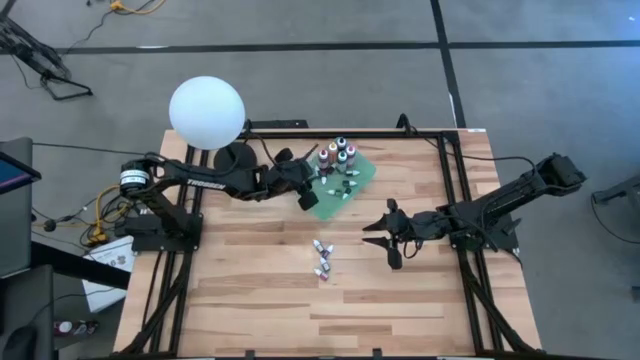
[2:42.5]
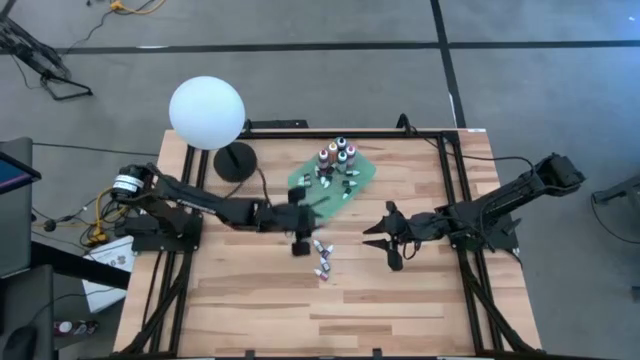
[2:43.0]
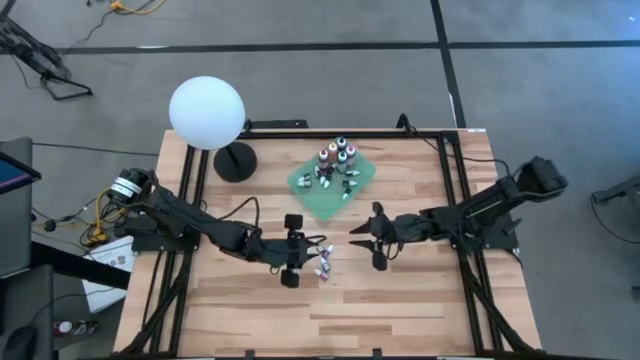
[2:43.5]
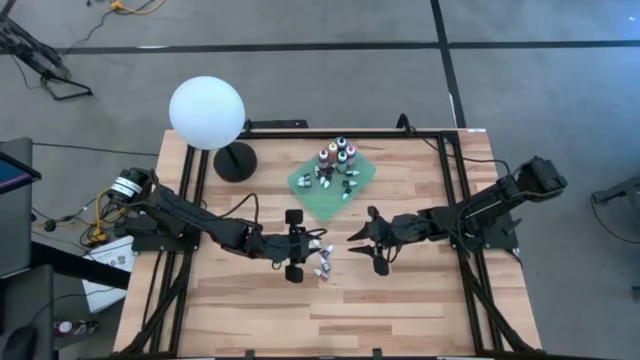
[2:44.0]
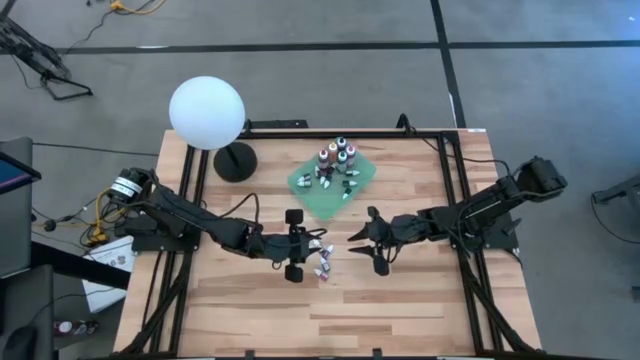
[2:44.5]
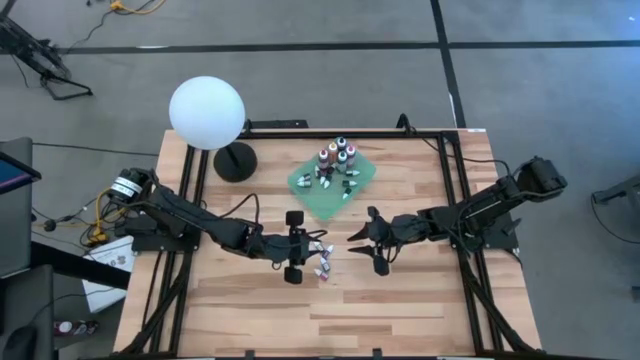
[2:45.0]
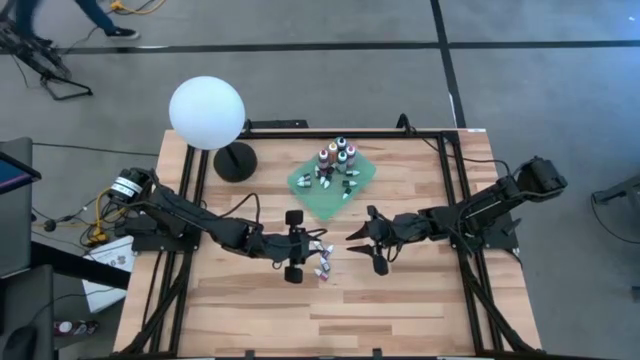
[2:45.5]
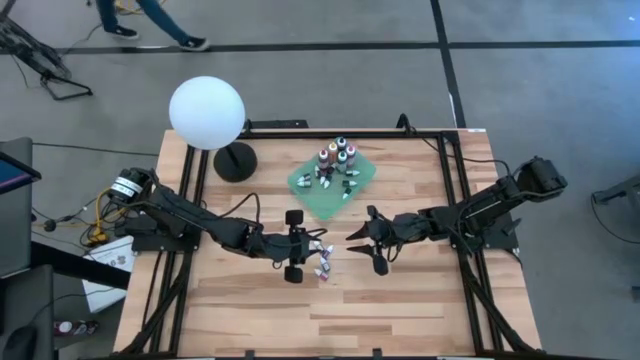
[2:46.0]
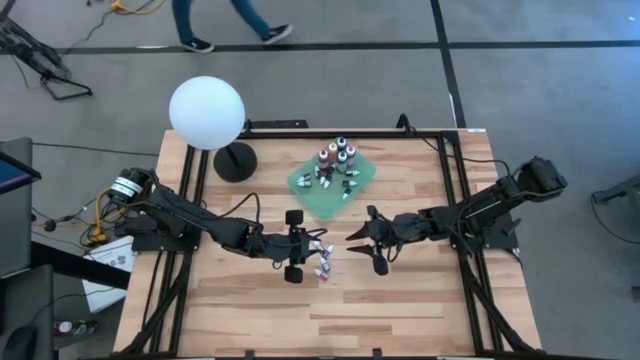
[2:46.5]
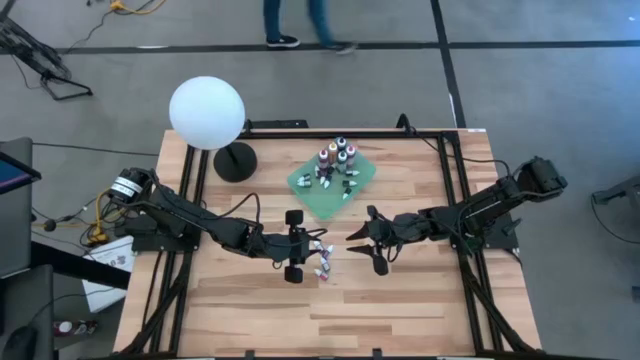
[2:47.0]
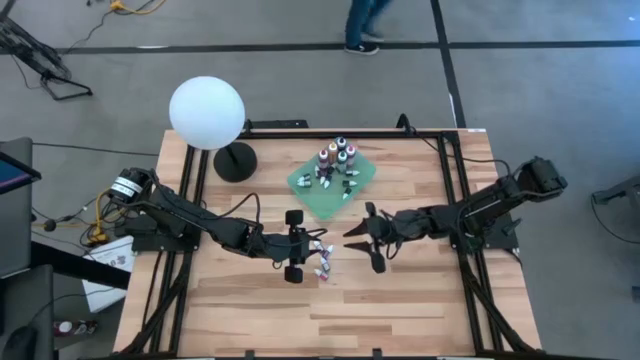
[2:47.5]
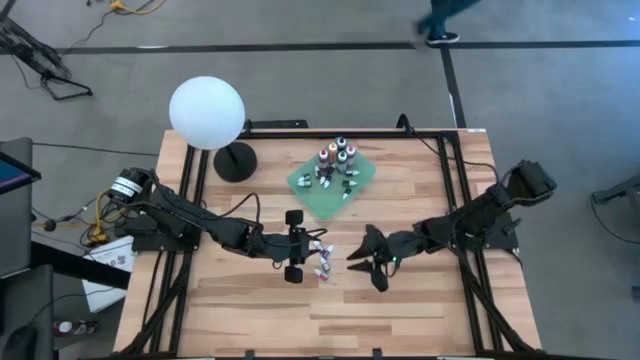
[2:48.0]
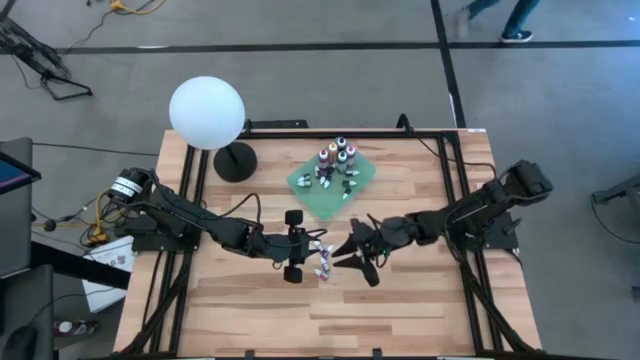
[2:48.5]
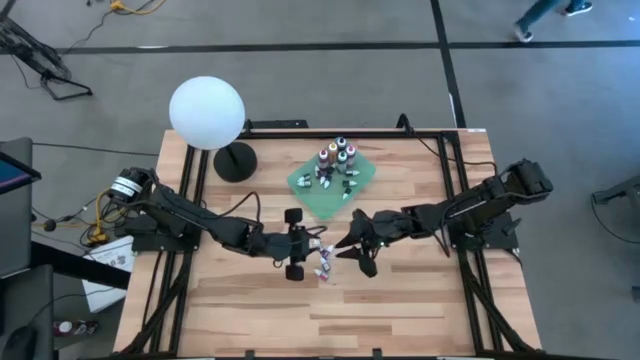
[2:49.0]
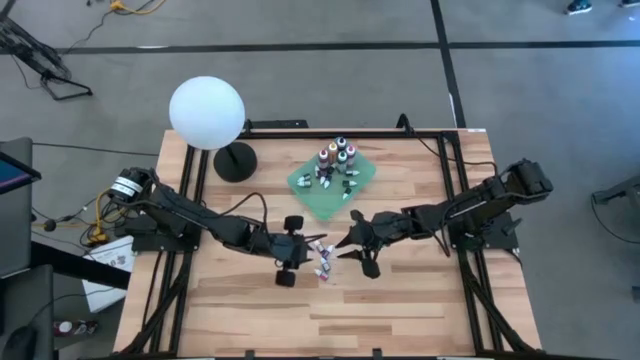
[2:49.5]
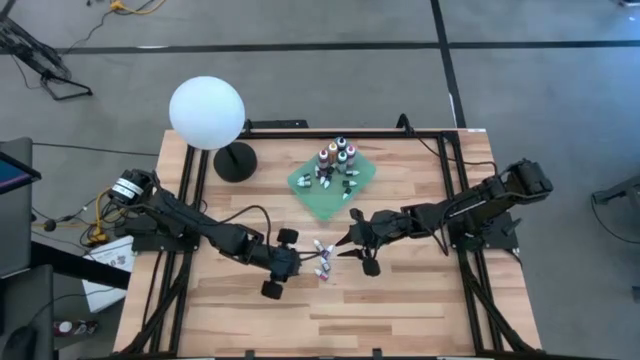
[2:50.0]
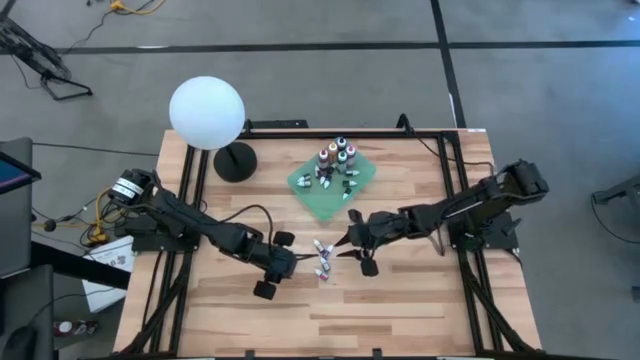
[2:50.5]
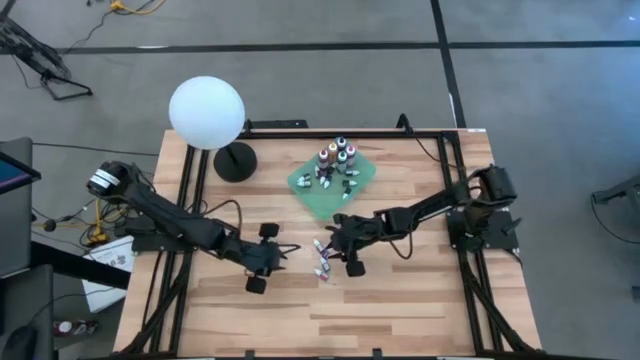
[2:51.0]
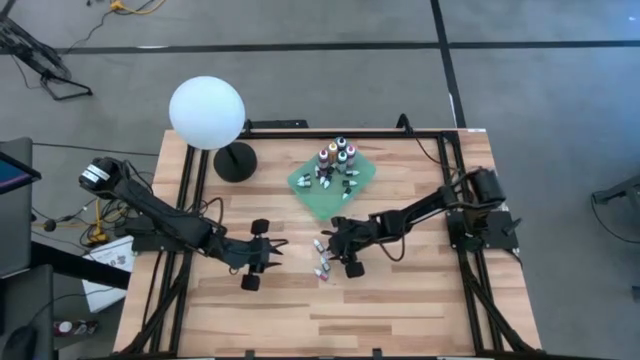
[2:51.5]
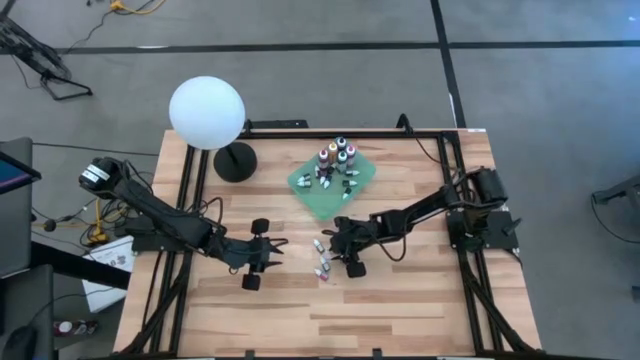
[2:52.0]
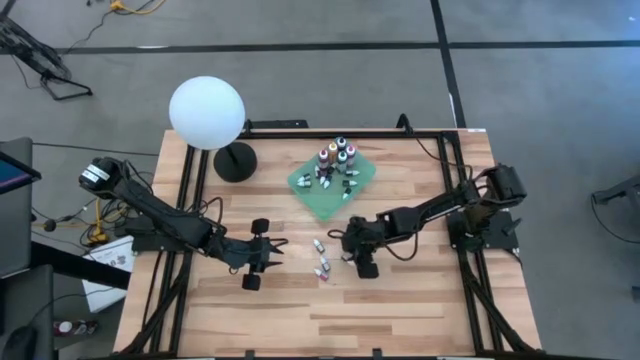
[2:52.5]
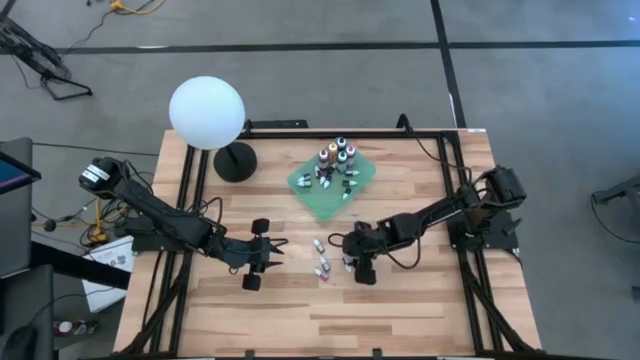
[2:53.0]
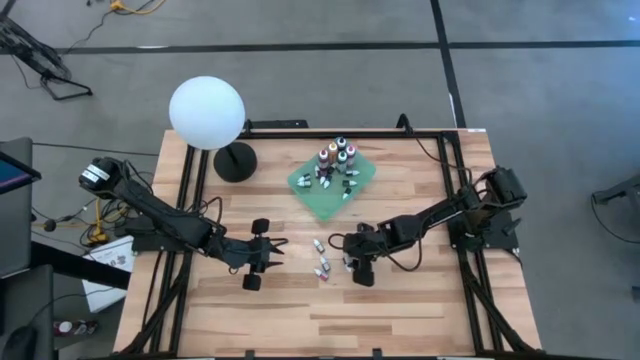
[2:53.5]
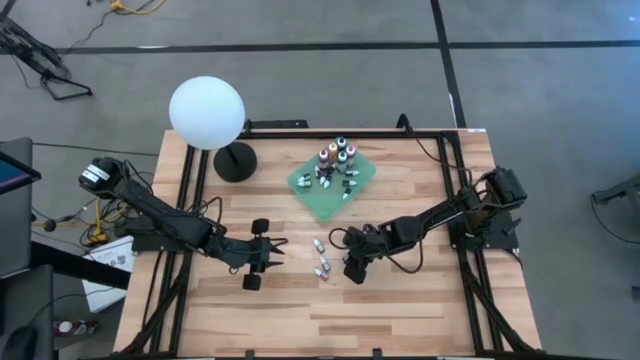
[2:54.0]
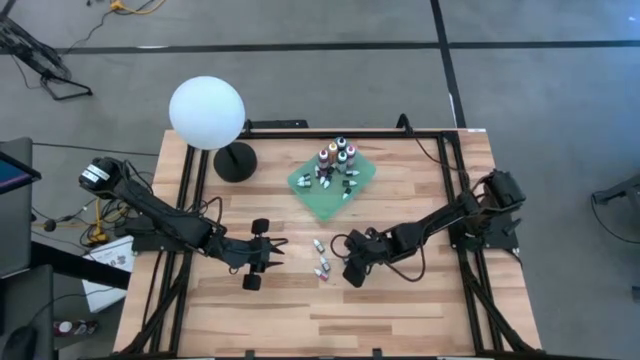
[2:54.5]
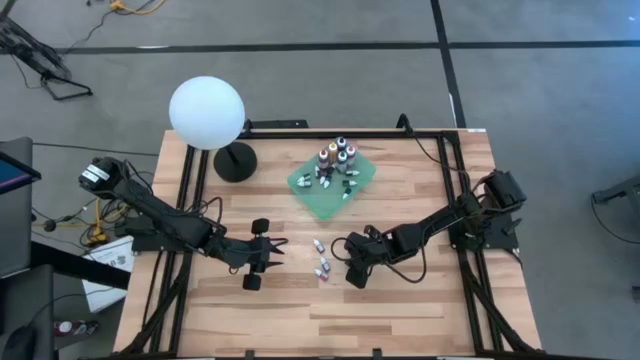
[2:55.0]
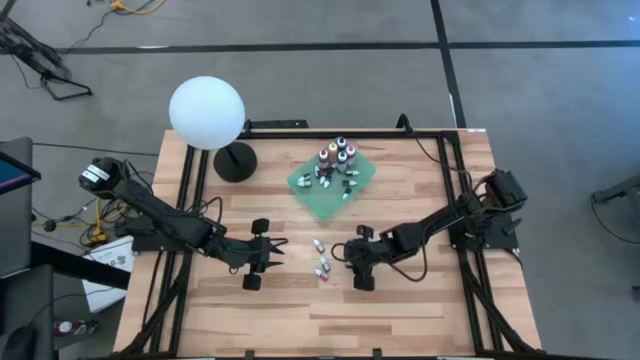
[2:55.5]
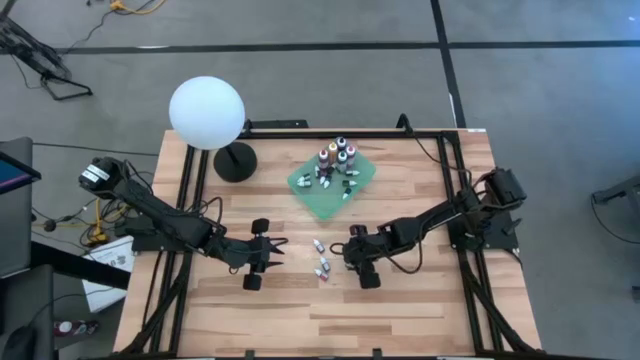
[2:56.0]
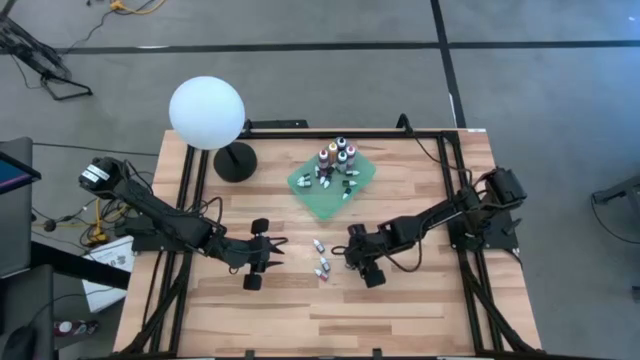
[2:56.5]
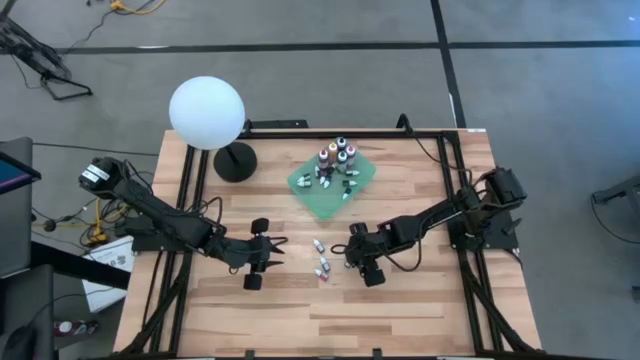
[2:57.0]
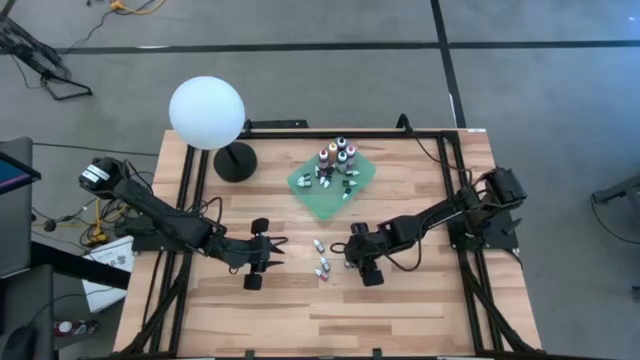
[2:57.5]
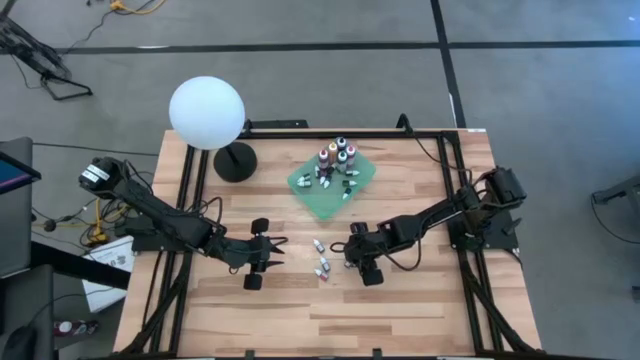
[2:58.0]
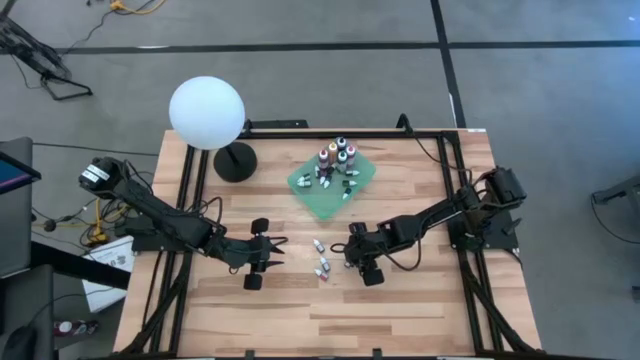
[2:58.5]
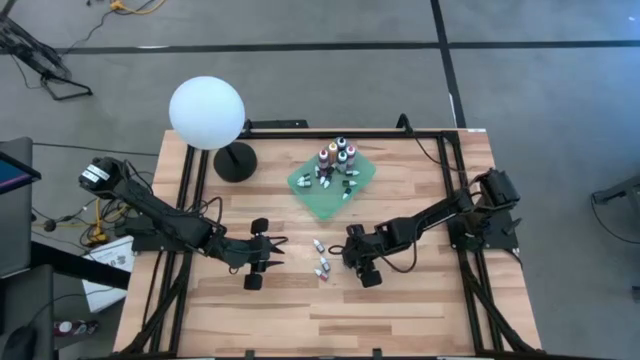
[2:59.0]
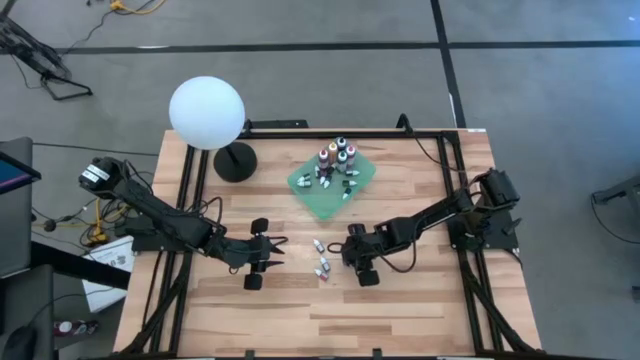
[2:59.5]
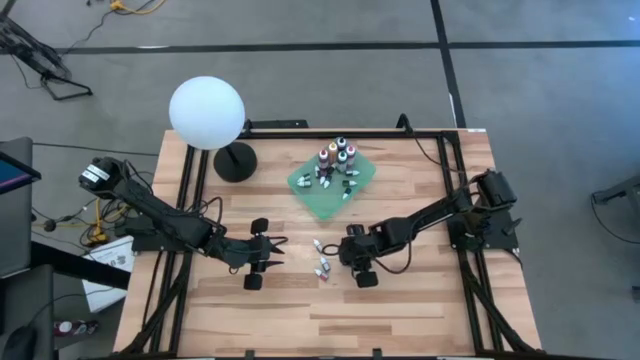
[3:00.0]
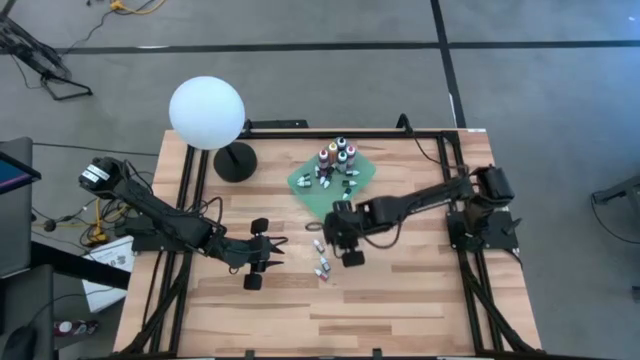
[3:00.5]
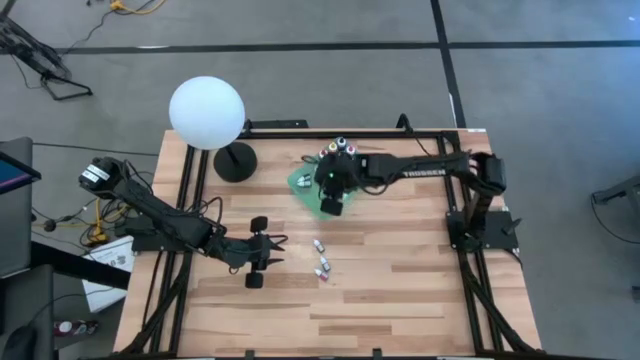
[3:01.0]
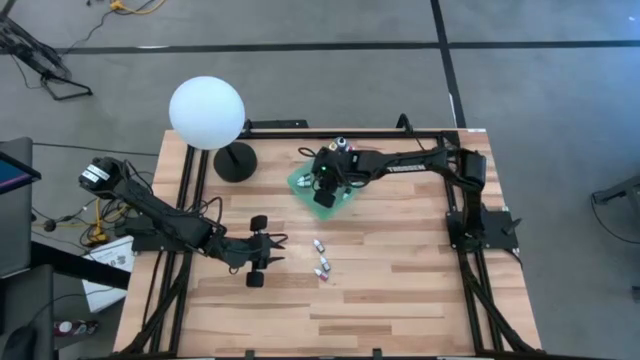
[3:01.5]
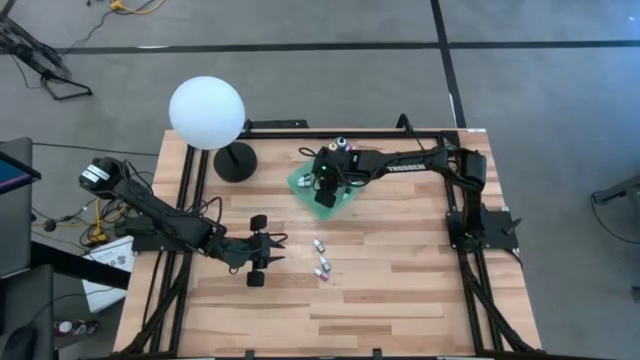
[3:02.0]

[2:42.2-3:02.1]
Task: Pick & Place food coloring
Put the purple food coloring bottle into the green bin
